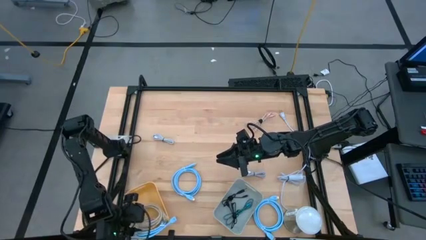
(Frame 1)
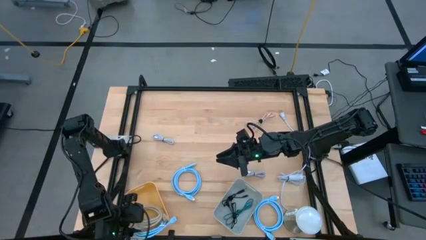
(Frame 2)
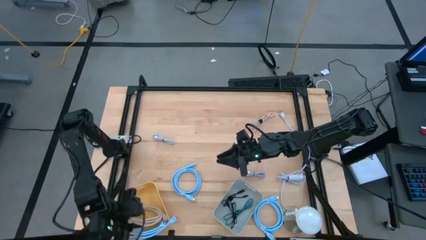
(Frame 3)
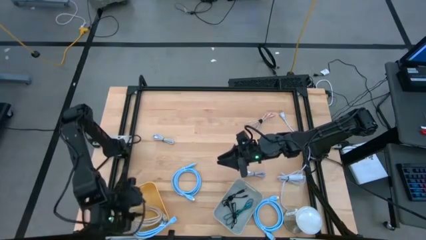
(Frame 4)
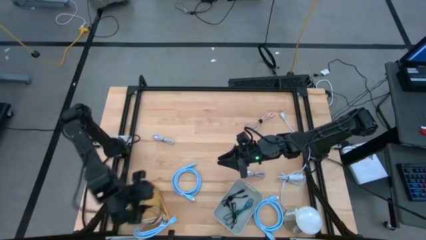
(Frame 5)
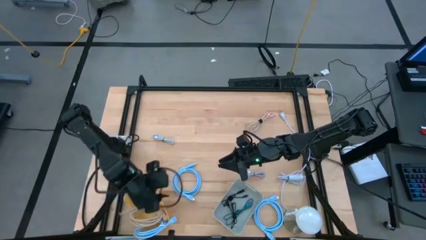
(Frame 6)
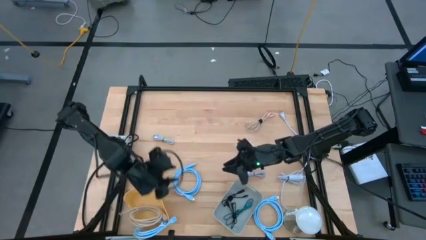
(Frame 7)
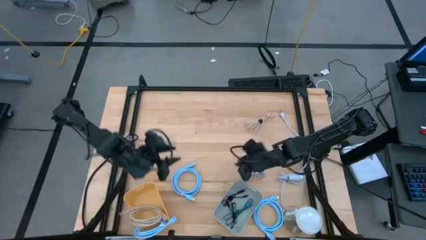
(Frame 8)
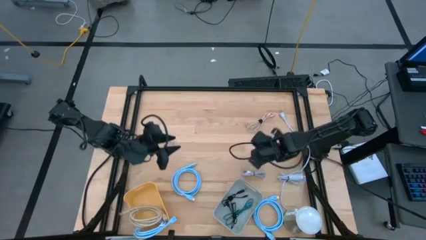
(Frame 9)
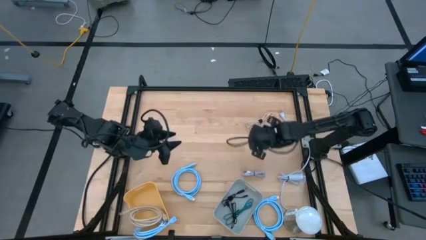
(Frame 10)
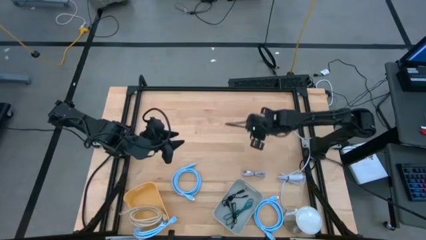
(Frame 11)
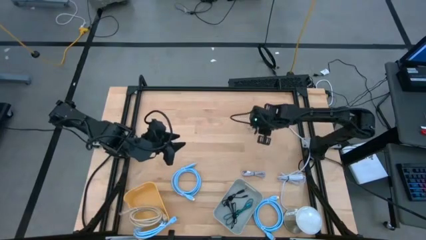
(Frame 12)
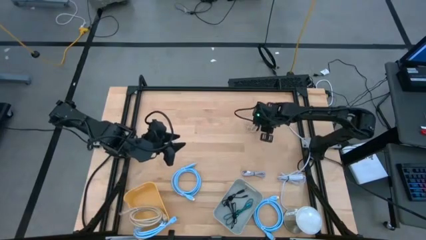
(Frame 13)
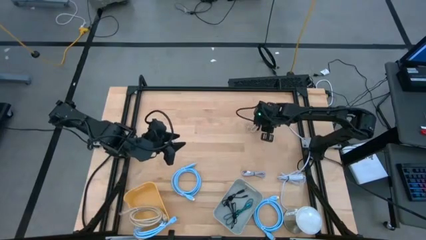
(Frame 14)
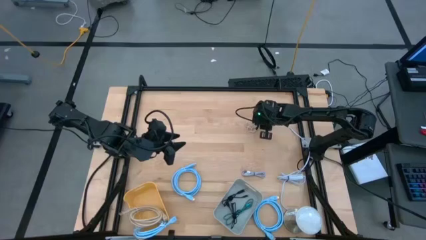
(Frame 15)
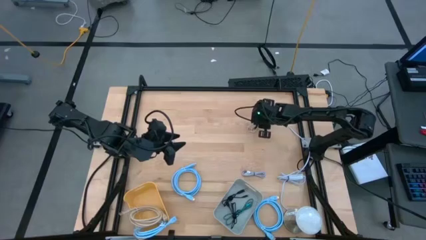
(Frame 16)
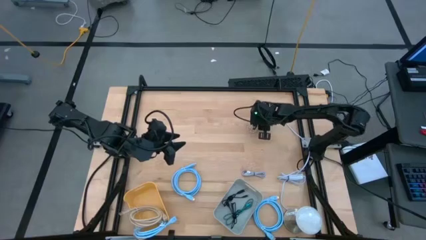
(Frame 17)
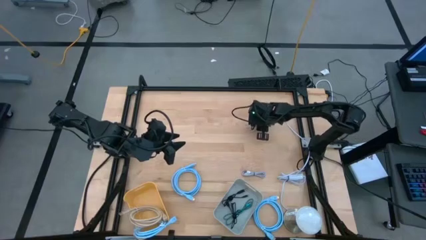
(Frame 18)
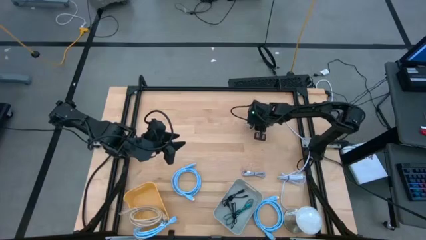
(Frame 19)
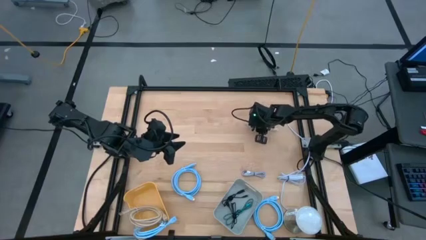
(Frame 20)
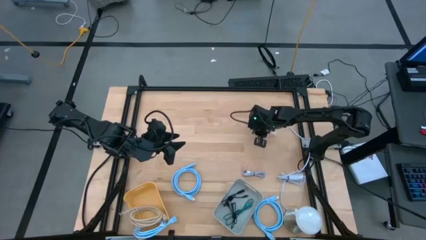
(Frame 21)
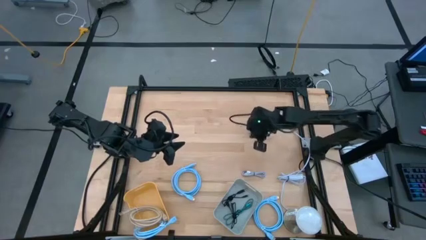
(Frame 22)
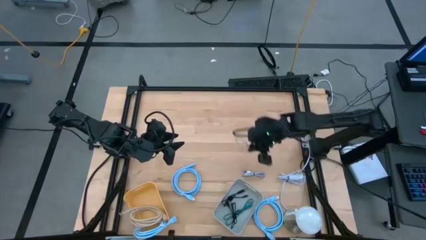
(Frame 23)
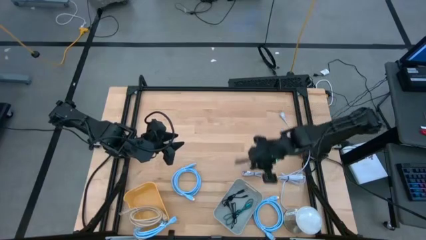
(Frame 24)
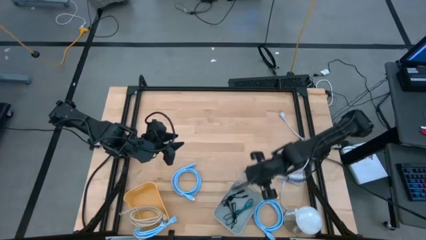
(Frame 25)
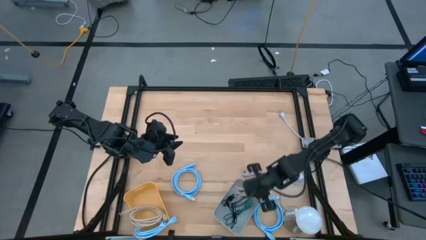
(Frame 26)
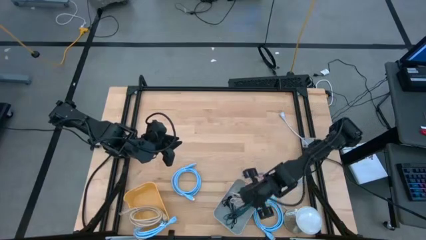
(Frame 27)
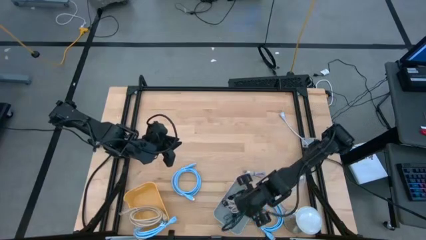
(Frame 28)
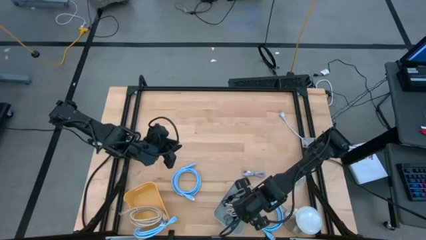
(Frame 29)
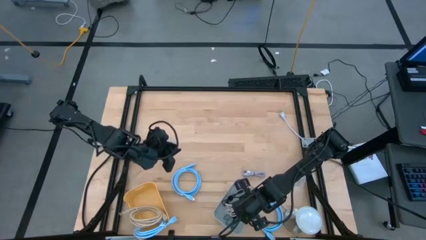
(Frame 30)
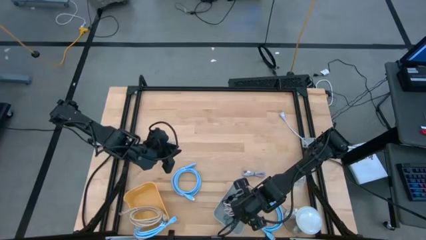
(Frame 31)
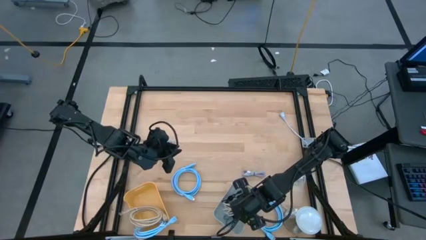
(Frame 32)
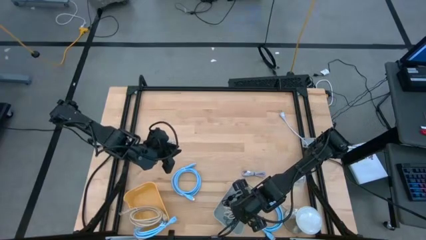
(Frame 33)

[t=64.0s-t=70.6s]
Task: Sort cables
Put the brown charger cable into the gray bin

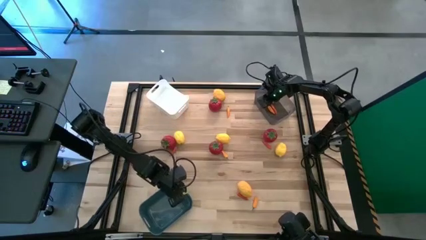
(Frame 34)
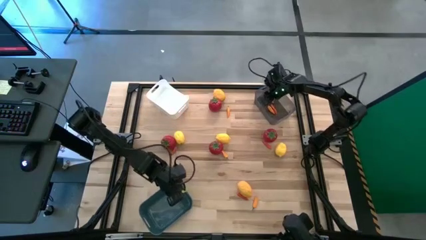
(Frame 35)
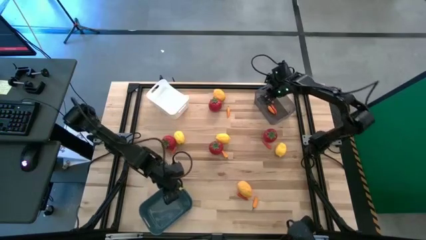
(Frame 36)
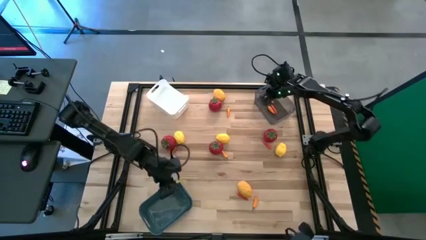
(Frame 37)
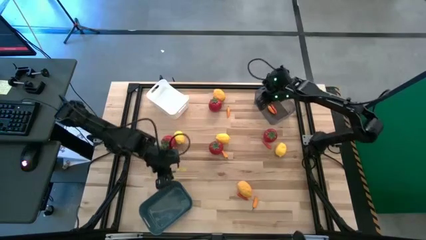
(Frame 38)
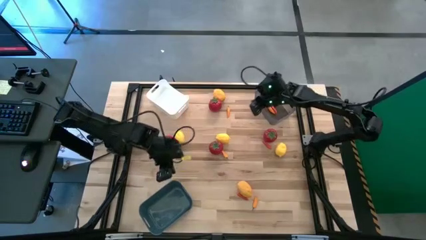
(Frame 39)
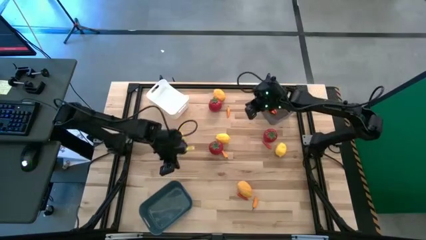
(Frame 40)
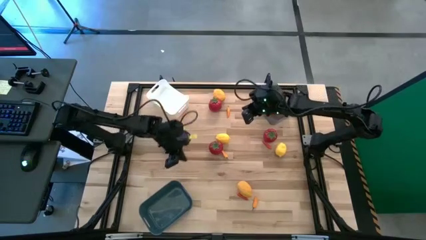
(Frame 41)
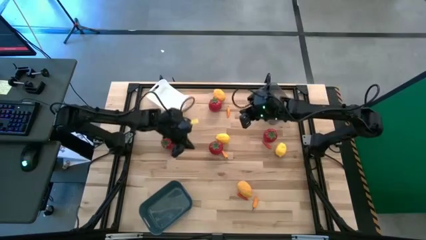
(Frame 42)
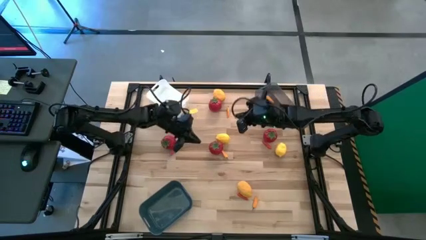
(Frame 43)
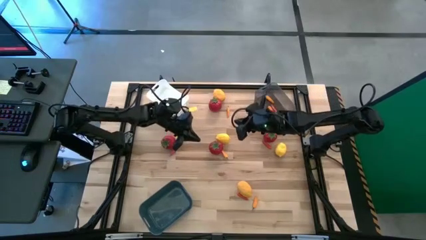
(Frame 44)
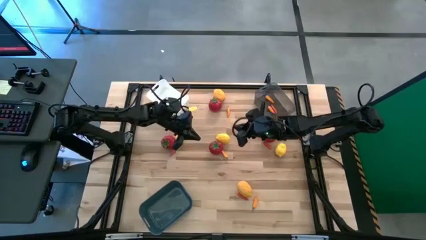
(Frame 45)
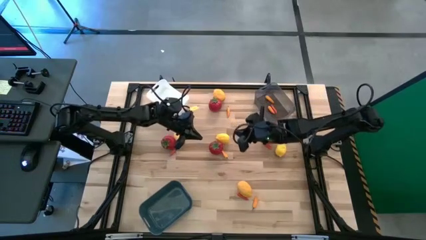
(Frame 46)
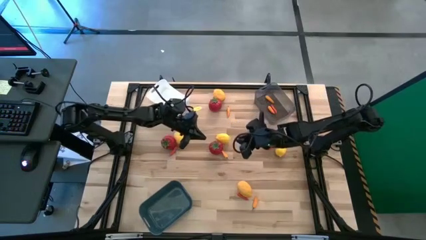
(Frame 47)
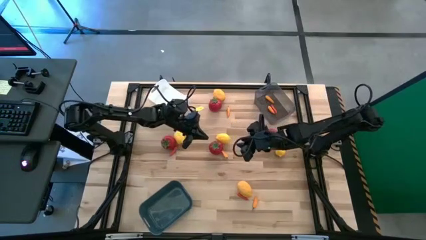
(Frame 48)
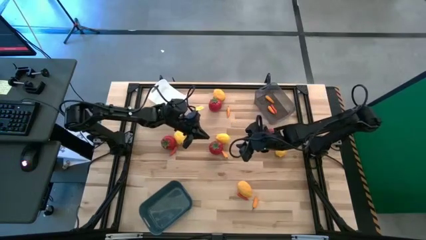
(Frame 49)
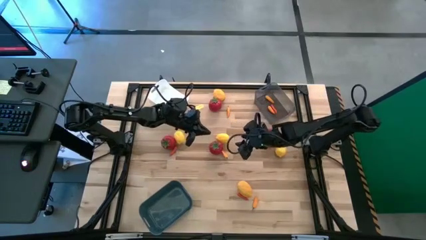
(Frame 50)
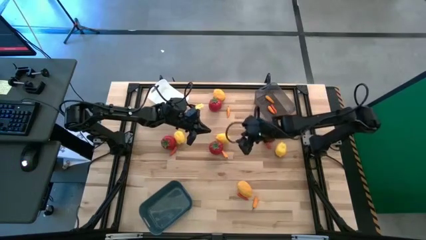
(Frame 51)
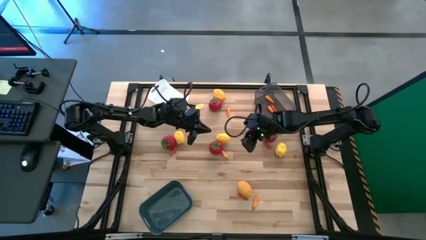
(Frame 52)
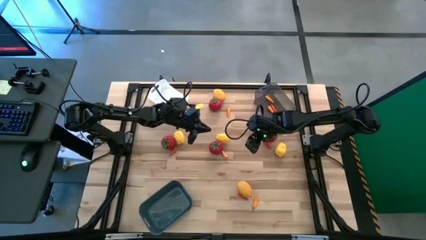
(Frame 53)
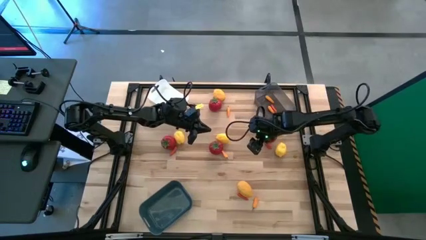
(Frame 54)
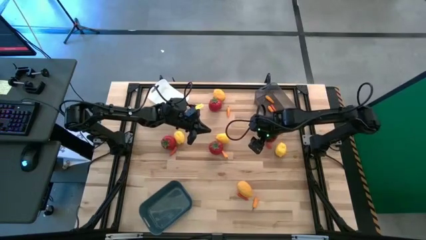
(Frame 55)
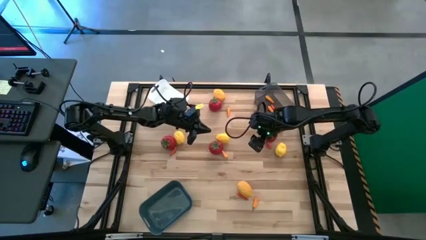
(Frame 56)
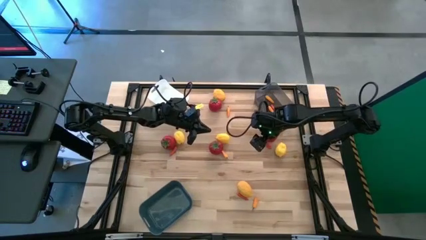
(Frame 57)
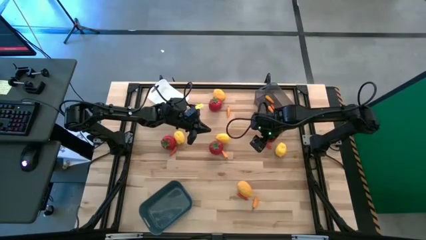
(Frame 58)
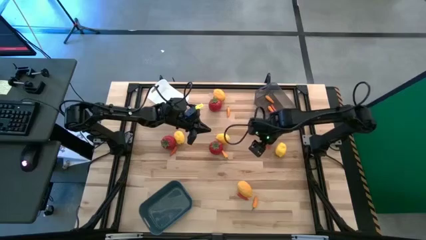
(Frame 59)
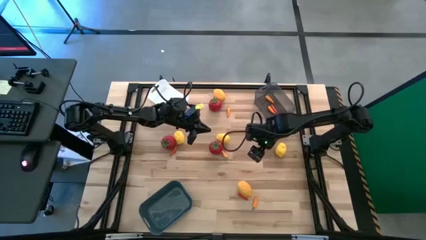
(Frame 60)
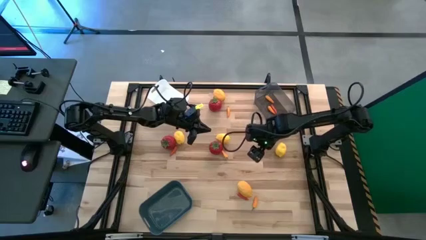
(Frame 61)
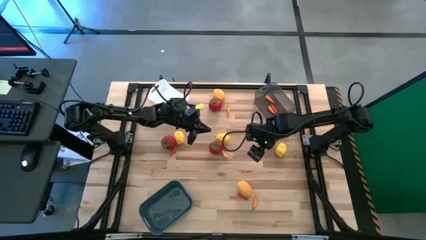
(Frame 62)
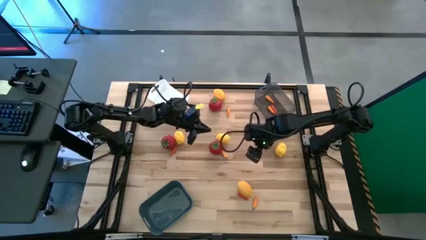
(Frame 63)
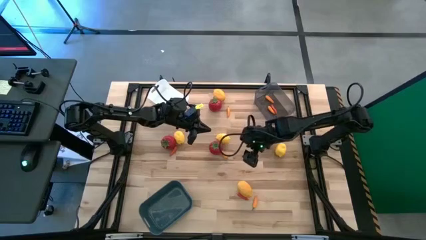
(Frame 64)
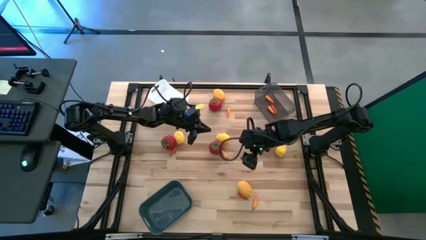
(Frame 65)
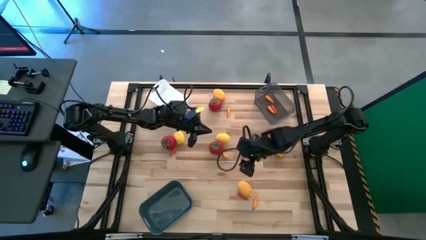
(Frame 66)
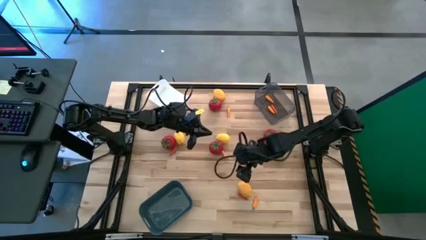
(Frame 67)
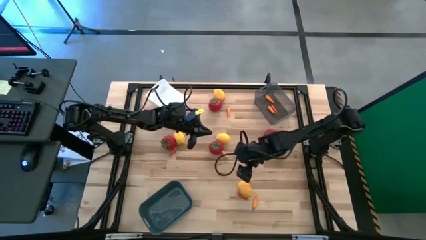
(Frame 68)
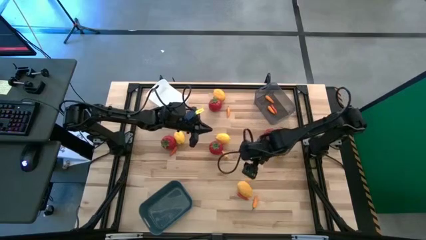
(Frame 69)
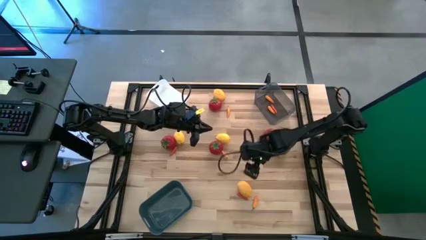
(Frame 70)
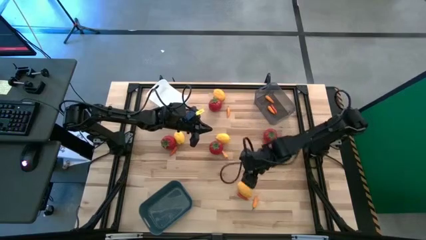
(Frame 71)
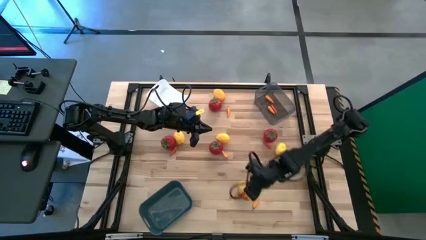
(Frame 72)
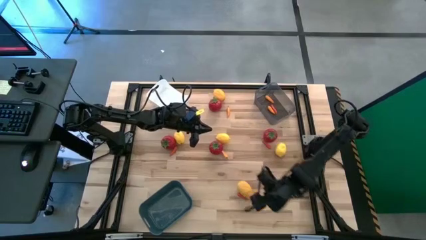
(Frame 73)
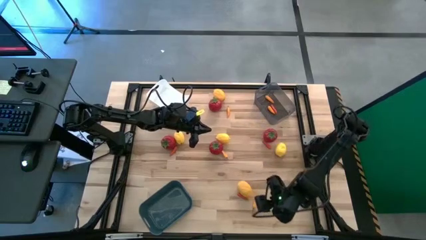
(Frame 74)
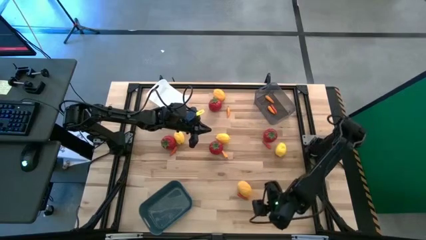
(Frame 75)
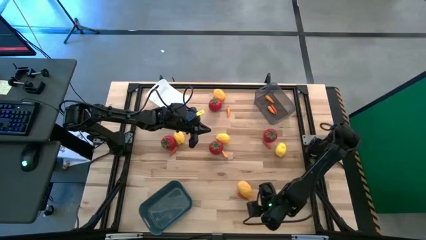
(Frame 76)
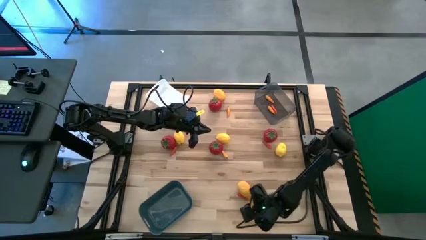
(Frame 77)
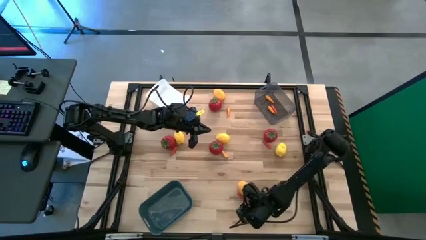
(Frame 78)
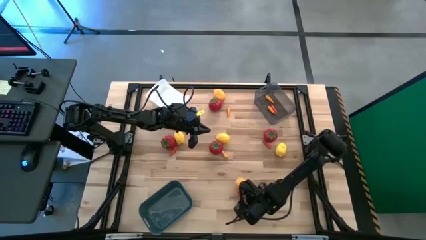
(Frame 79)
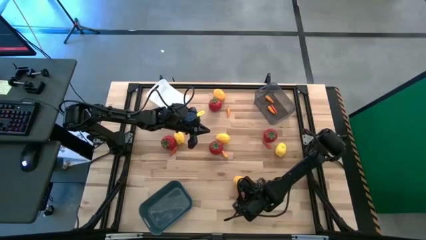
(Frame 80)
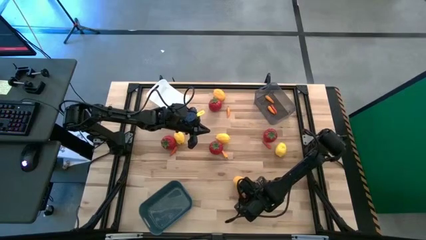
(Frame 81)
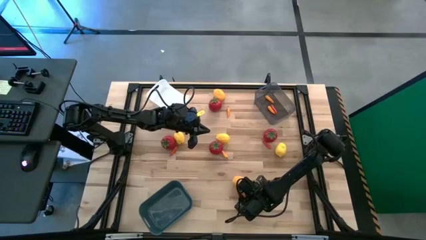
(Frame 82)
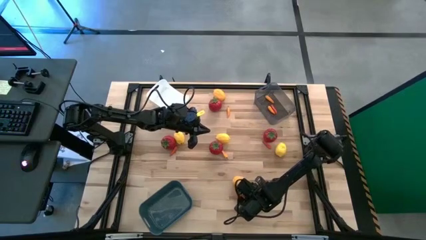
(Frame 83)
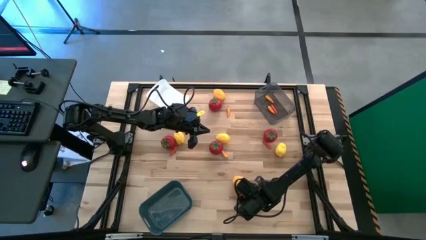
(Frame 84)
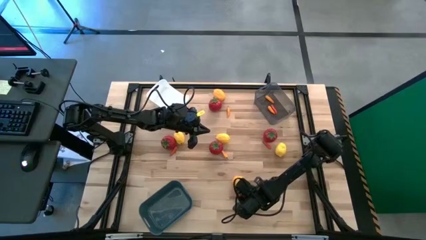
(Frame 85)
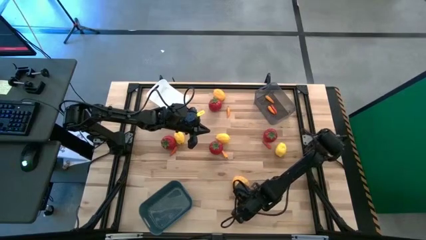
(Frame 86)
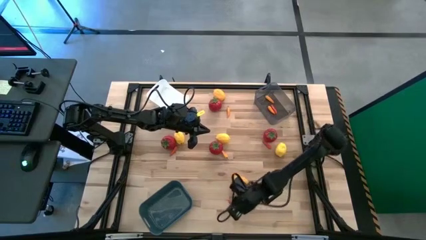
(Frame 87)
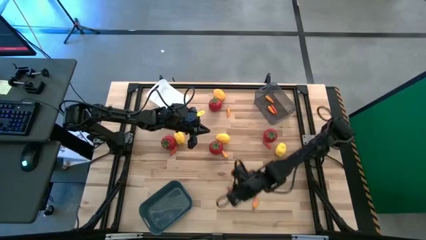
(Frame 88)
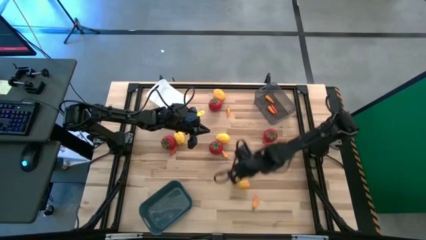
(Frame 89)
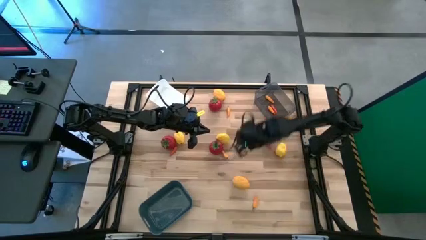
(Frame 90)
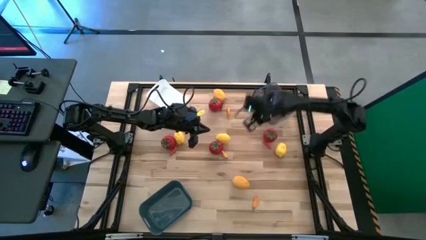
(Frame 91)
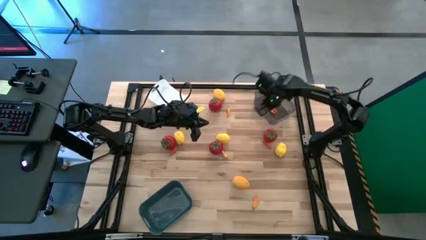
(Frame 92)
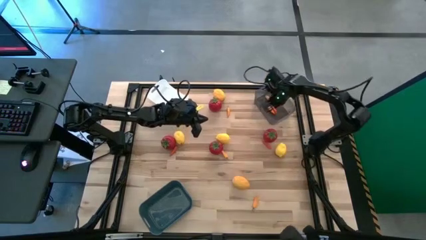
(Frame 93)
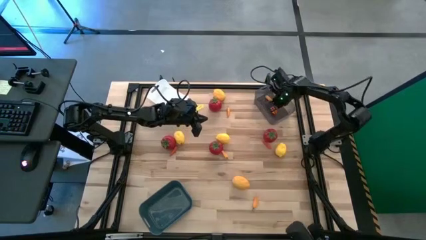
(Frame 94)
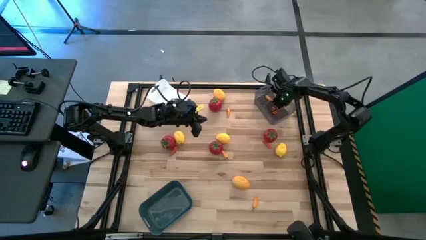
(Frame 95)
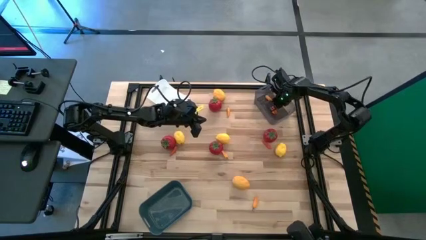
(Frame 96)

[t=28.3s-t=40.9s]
Task: Sort produce into baskets
Put the red chili pepper into the black transparent bin
